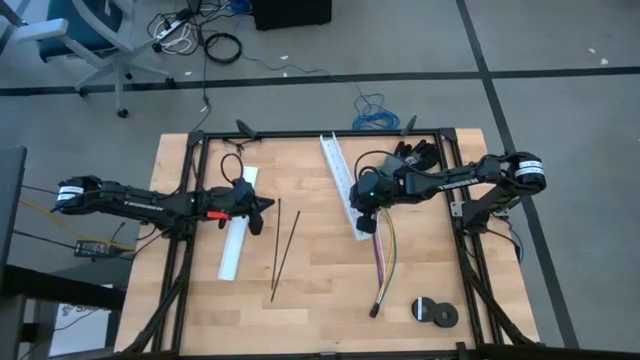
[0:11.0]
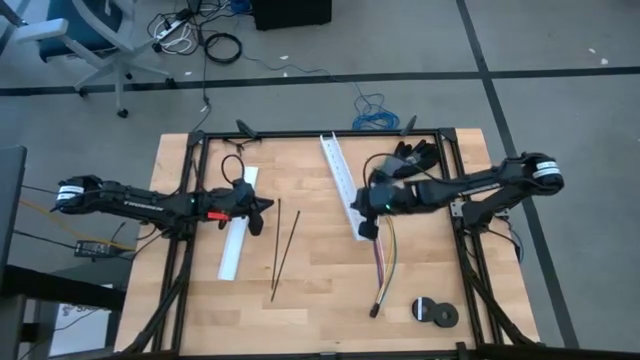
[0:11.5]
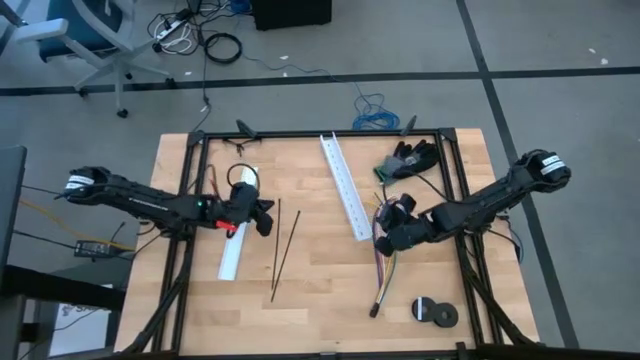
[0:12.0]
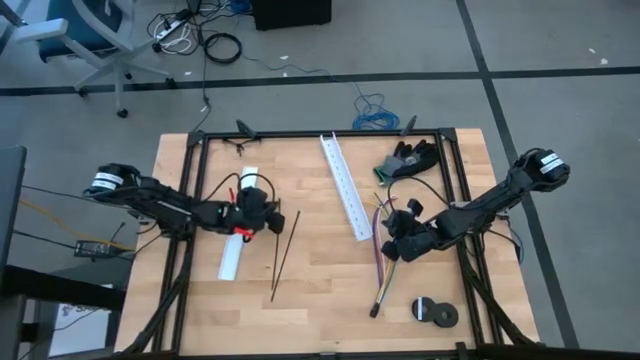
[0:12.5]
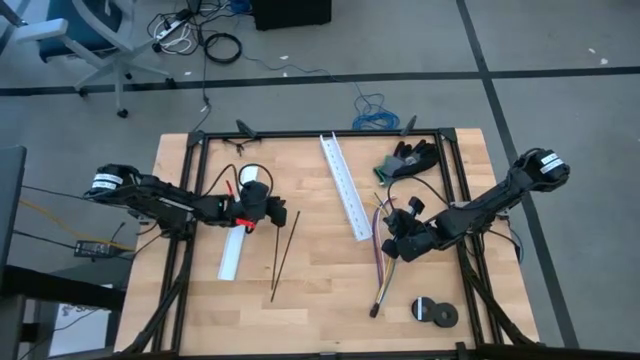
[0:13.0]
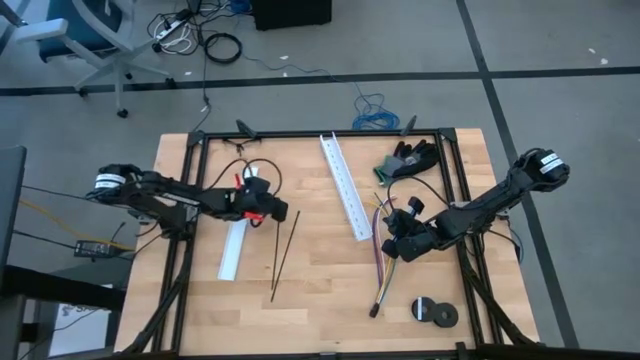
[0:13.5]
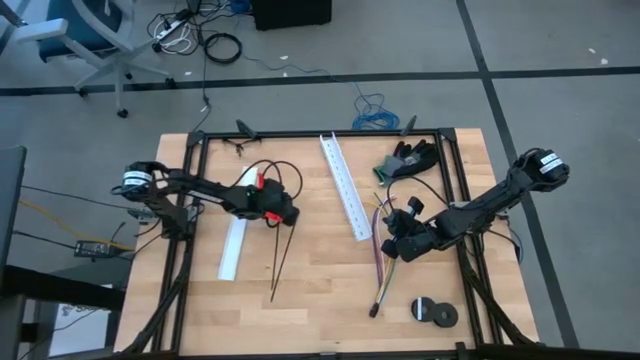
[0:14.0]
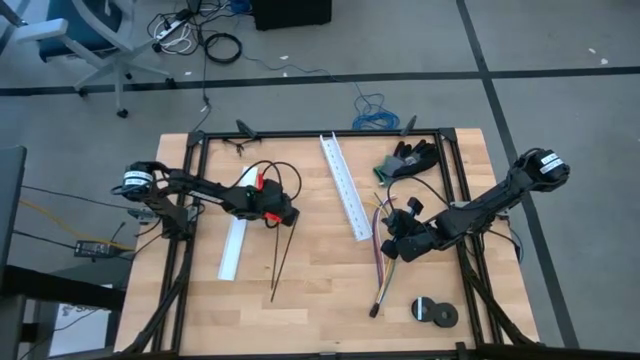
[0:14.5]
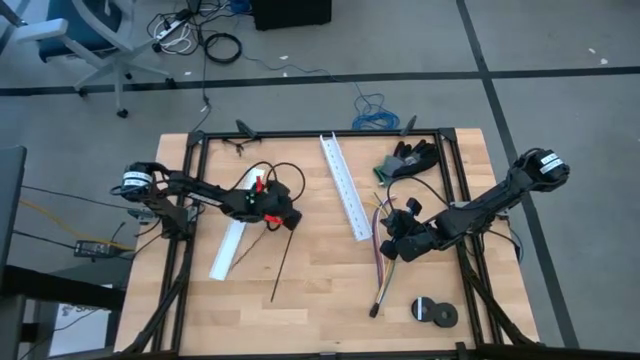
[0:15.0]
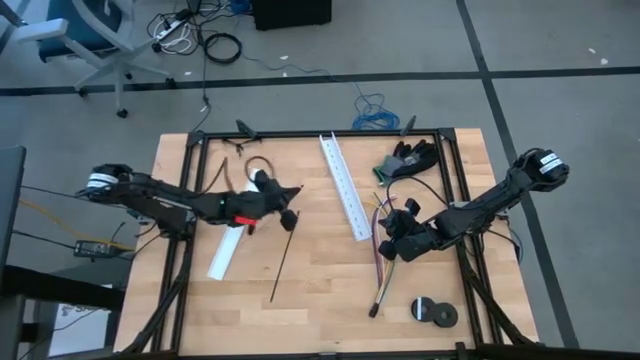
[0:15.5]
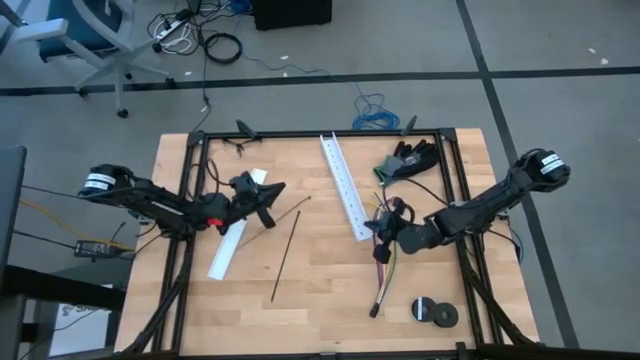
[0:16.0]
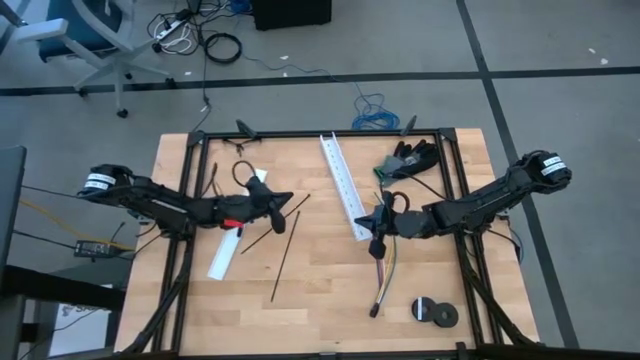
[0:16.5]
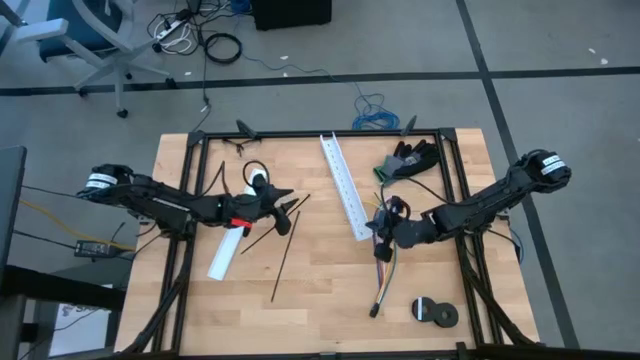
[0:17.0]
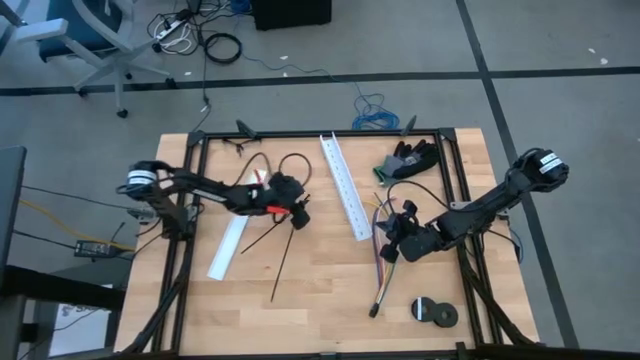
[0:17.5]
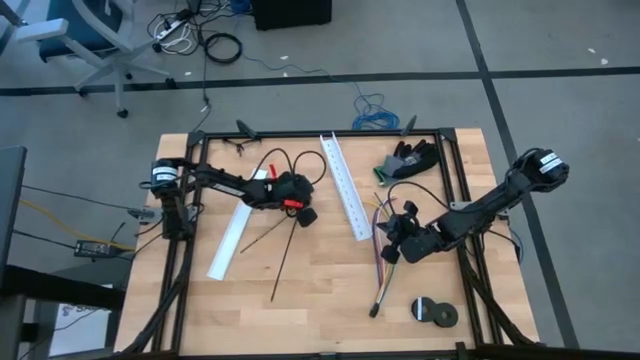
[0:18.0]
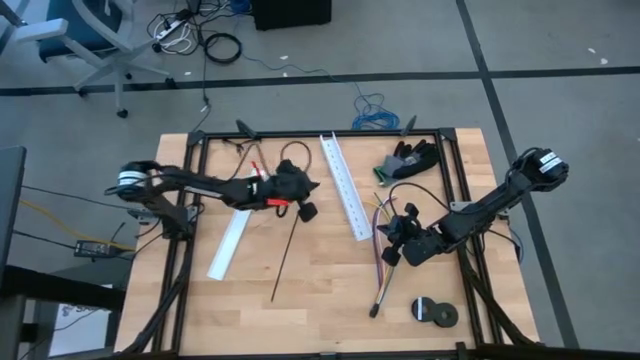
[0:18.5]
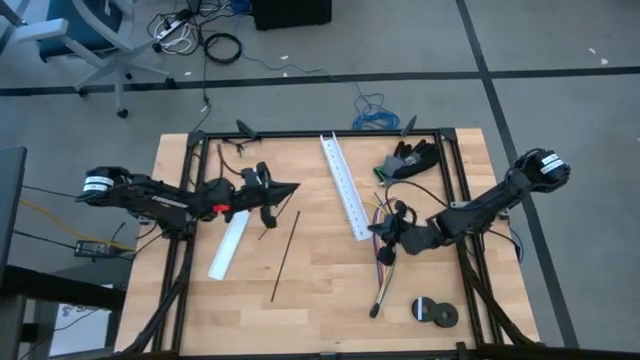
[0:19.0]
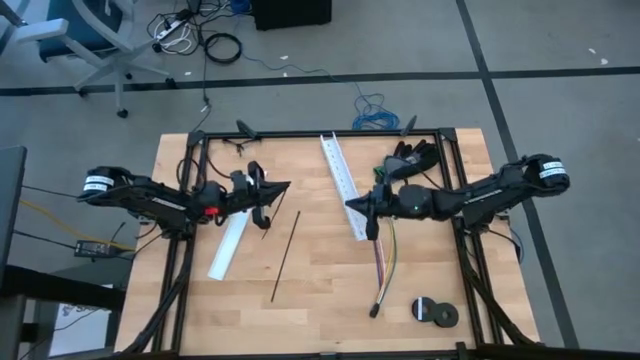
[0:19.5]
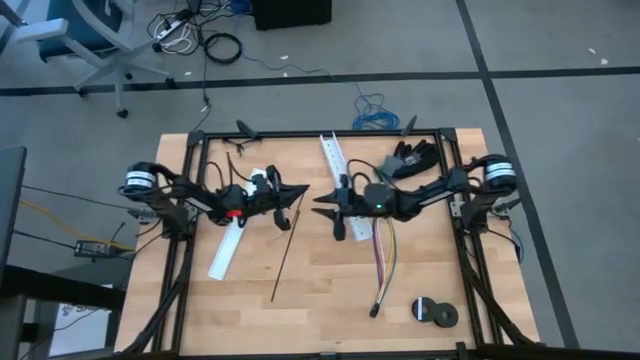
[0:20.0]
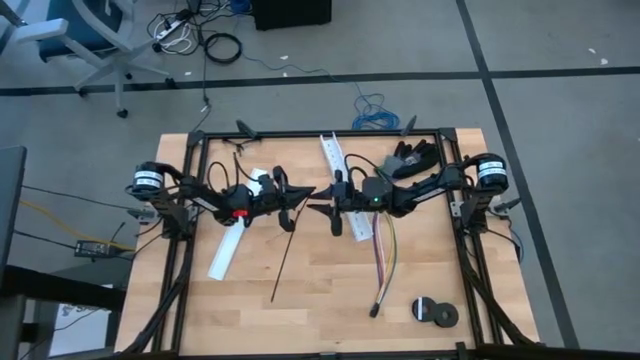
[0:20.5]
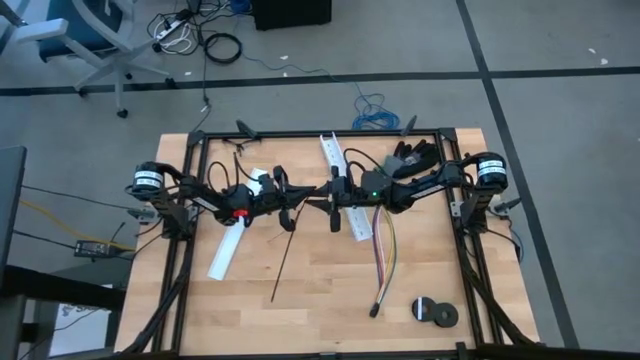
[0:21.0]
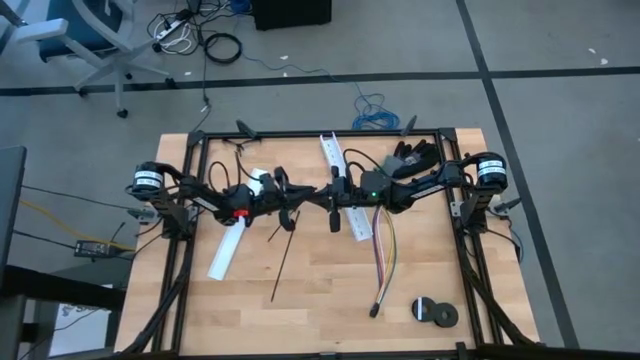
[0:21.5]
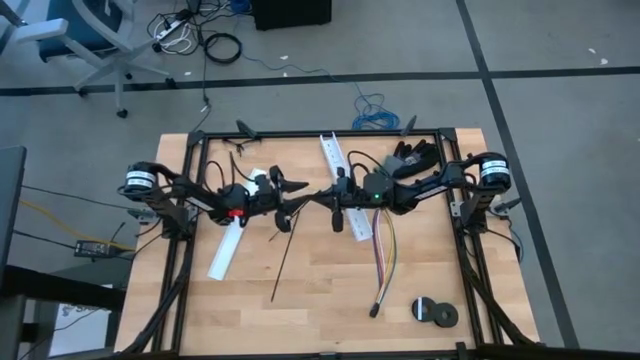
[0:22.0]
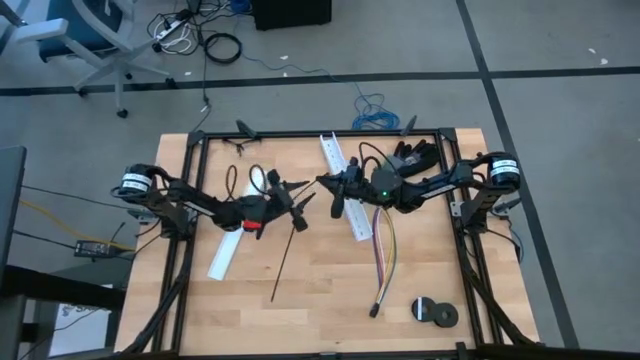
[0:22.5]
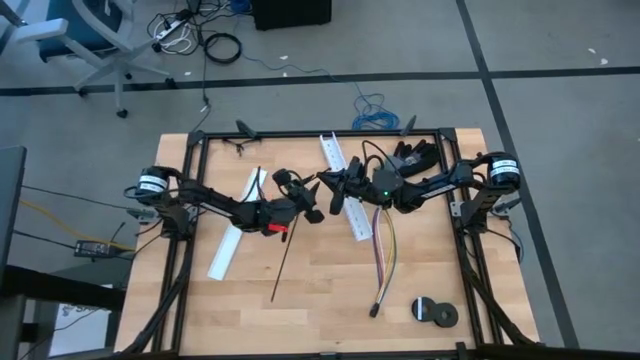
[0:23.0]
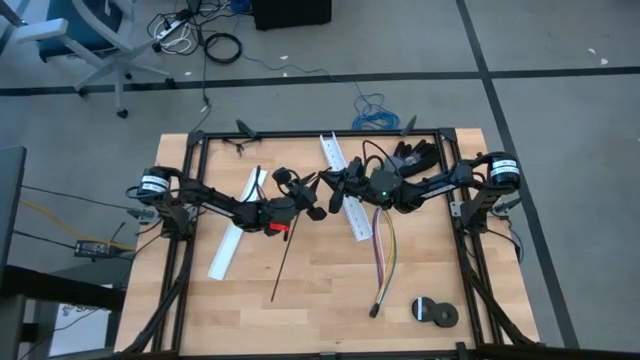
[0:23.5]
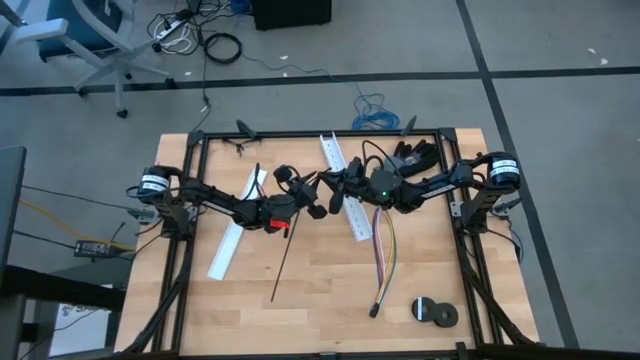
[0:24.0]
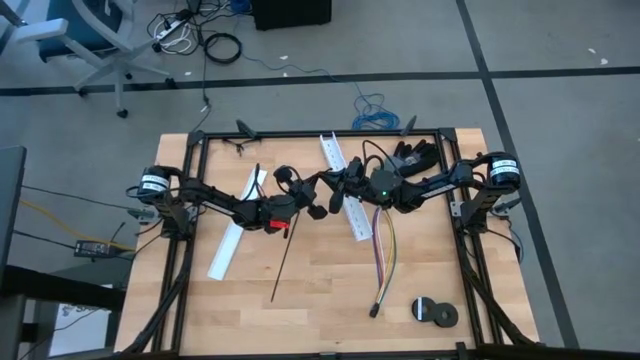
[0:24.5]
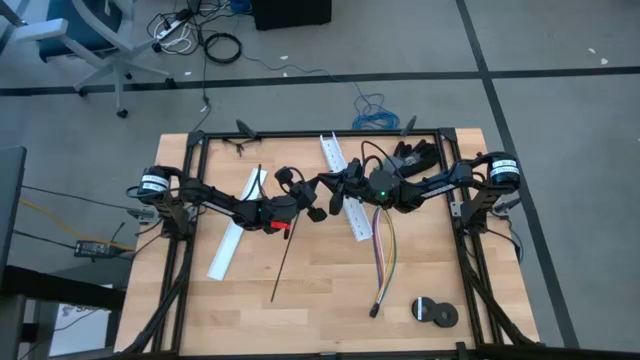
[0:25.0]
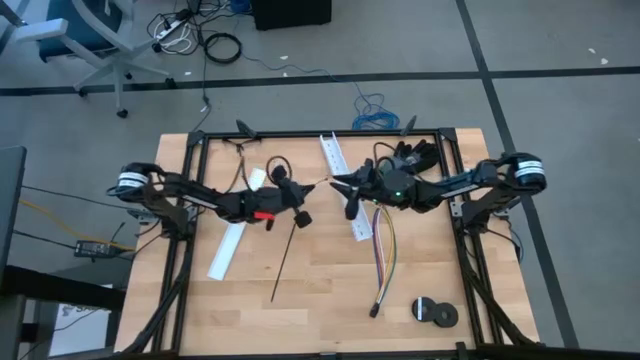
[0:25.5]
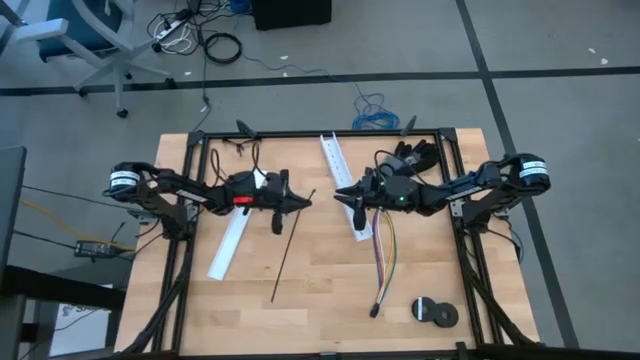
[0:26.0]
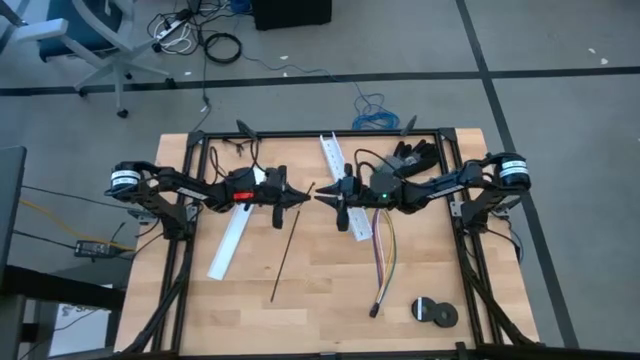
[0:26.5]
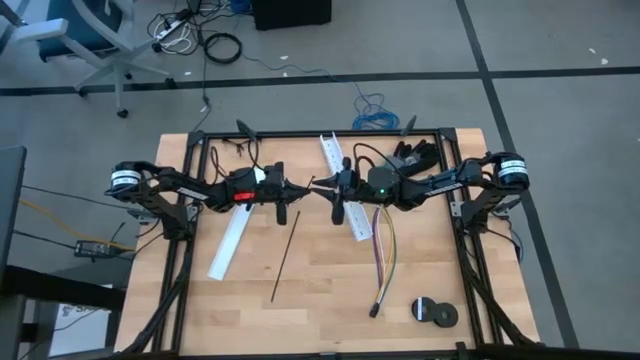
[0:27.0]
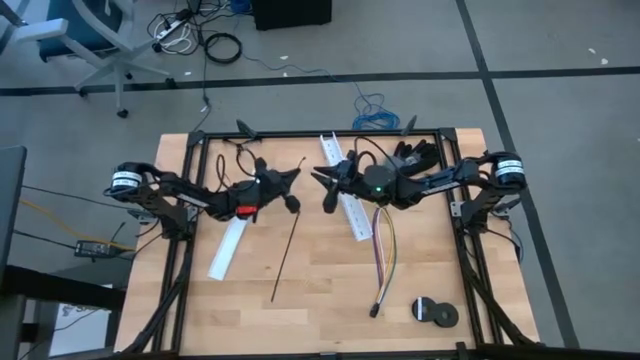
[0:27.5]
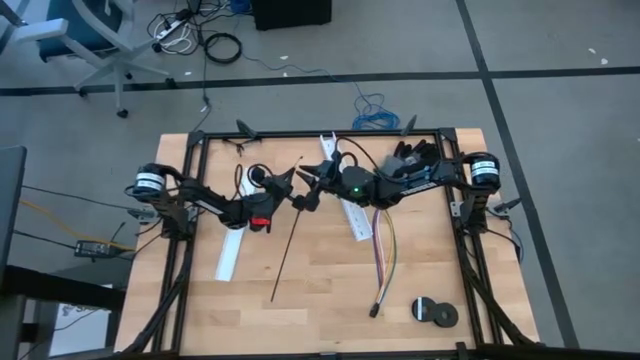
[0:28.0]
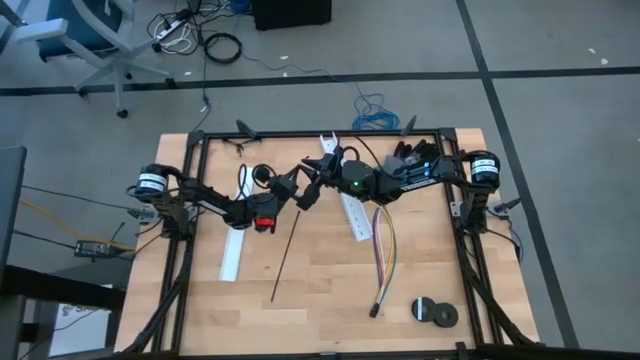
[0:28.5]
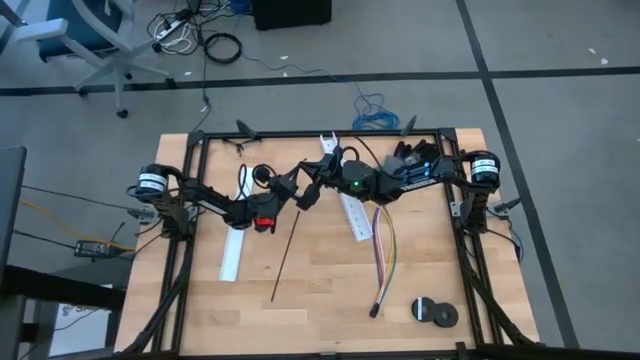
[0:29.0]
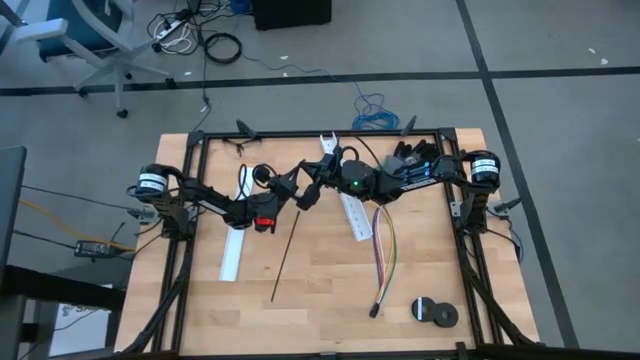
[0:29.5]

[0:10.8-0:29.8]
Task: Ziptie cables
Prepare the black zip tie
